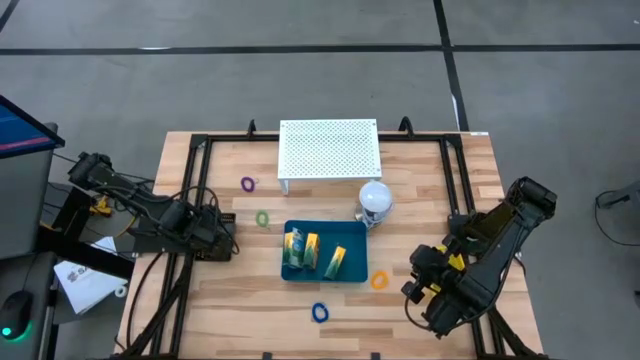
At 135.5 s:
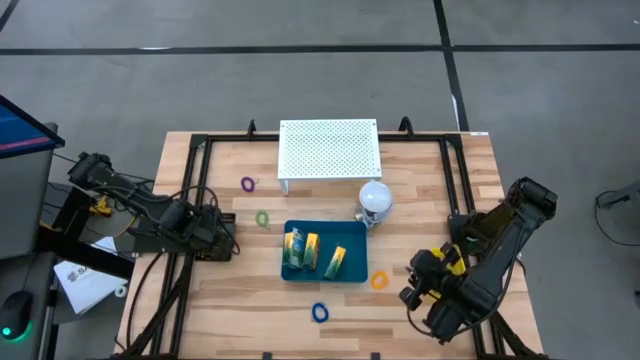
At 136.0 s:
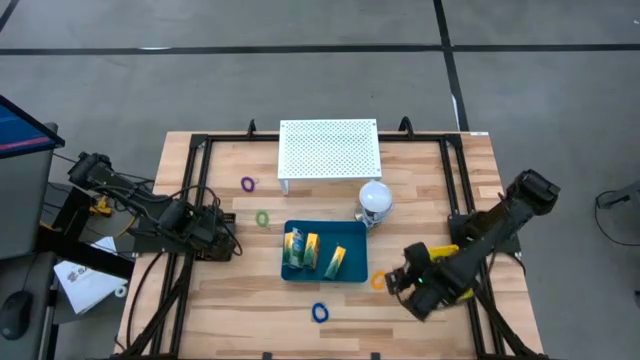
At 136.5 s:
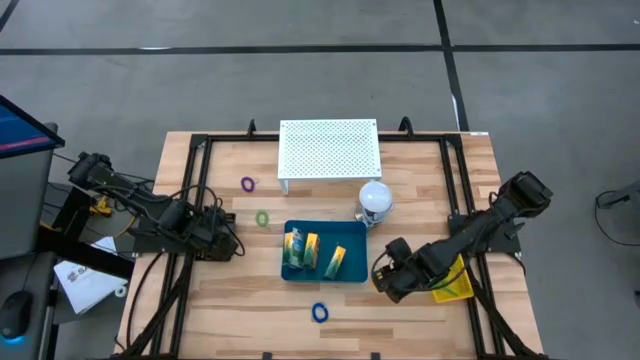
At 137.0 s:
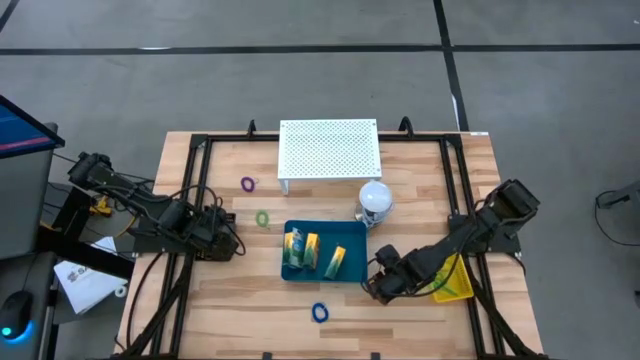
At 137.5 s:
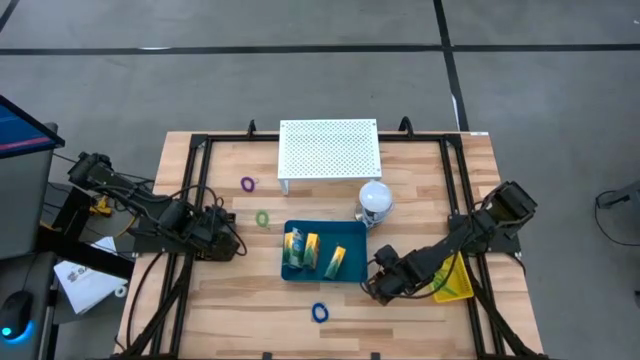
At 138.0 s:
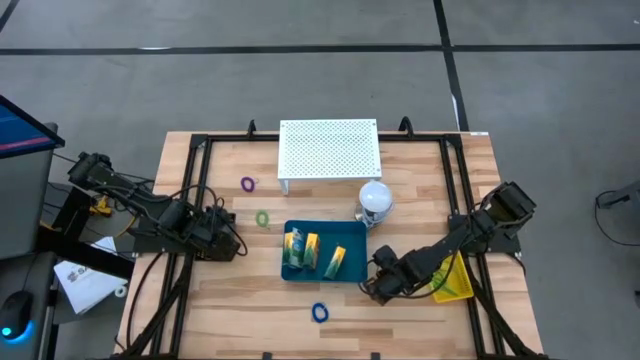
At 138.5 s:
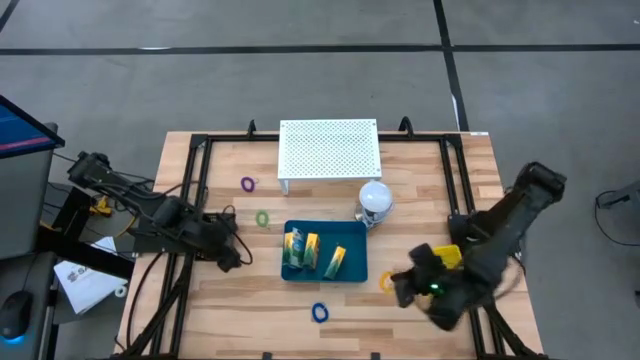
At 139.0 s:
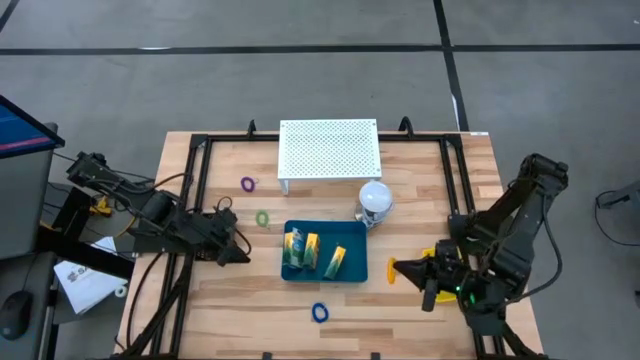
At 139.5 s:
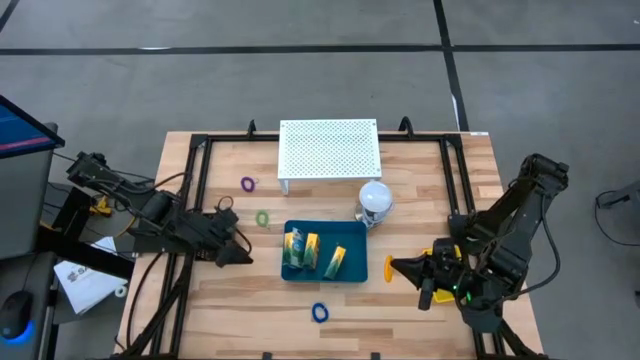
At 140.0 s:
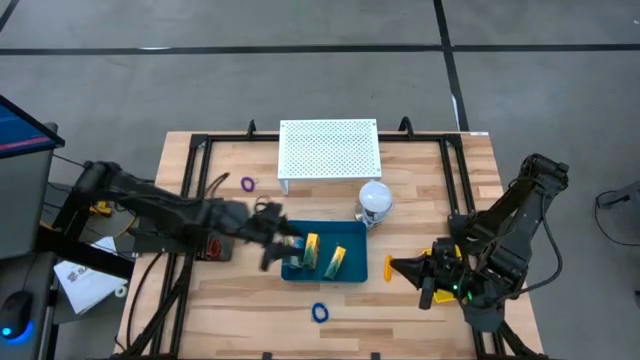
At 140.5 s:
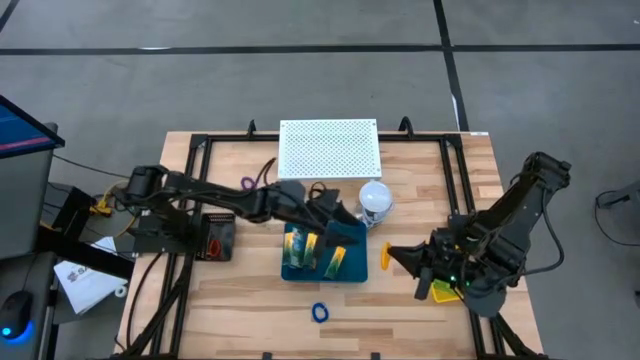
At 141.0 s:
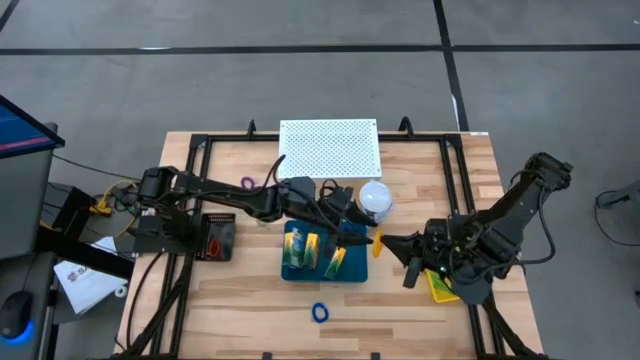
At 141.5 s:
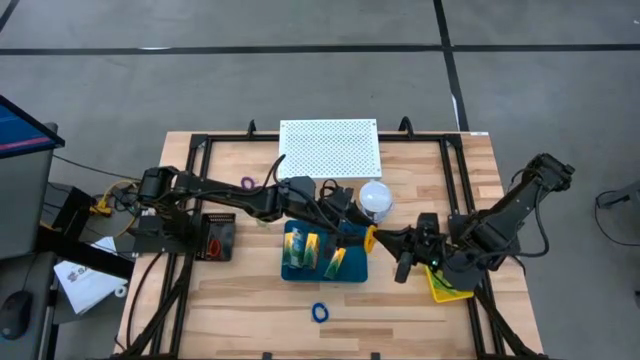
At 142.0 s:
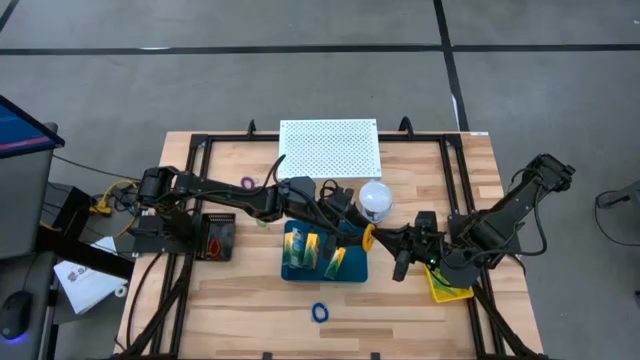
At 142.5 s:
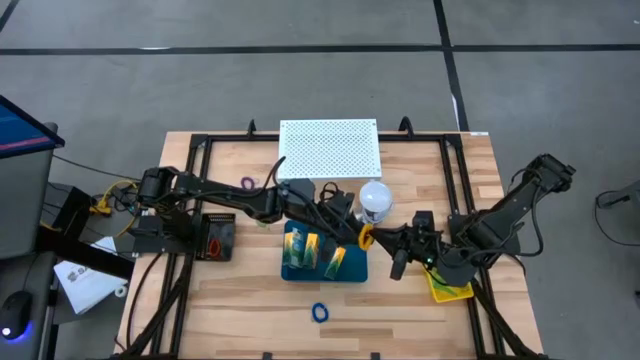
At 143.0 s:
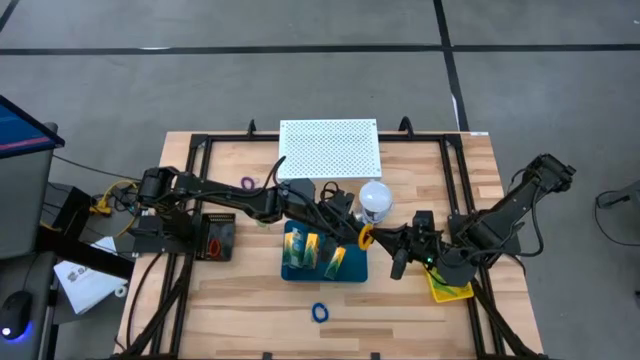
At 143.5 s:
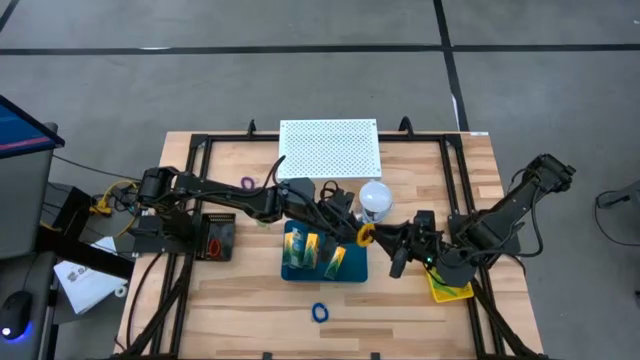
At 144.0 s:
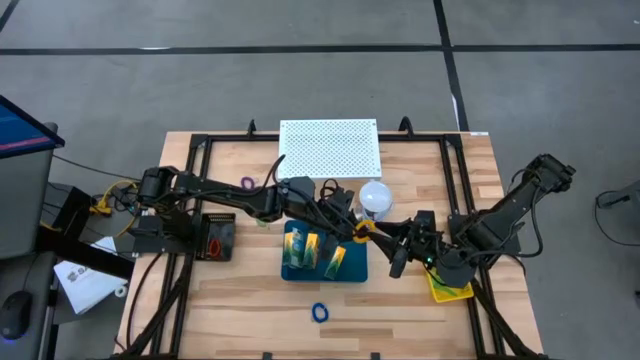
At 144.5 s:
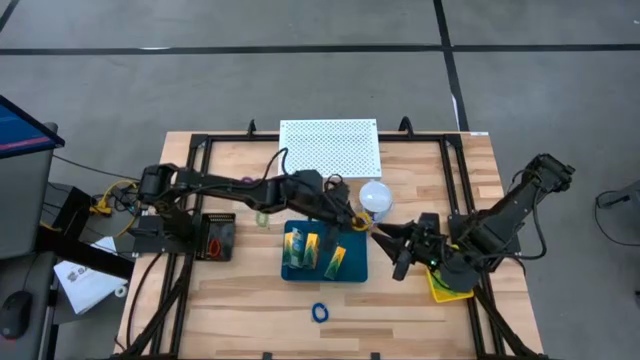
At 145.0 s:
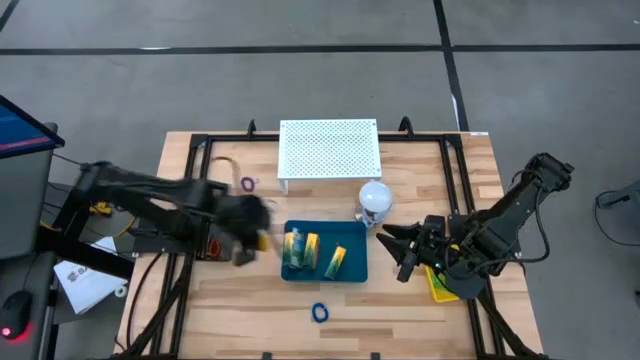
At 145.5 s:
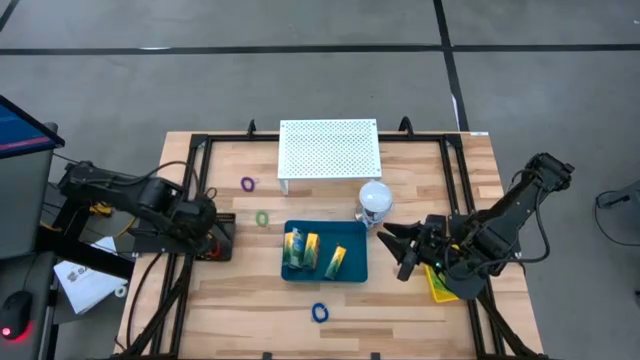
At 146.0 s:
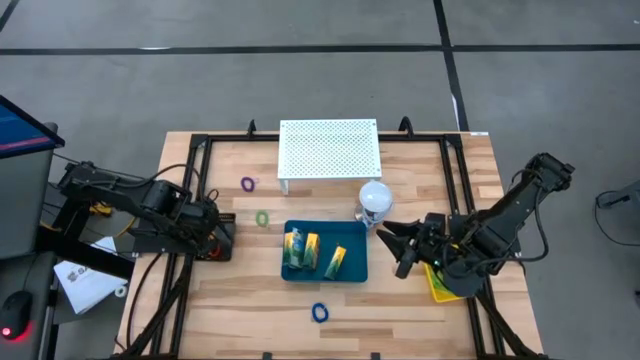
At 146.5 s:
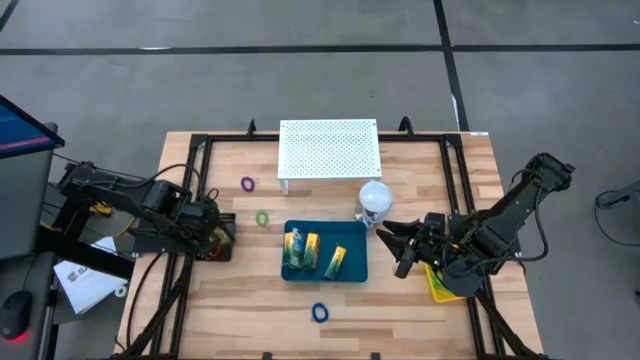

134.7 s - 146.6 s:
Task: Pick & Place Office Desk Supplies
Put the yellow spring keychain into the black bin

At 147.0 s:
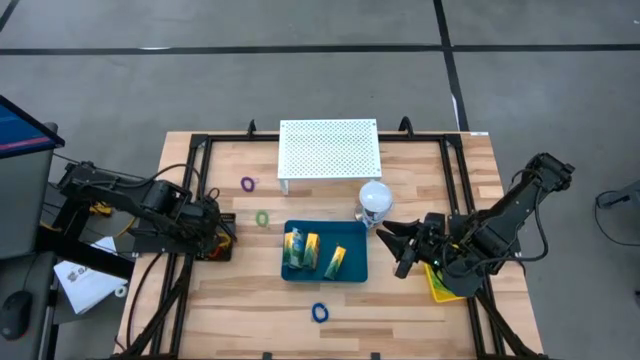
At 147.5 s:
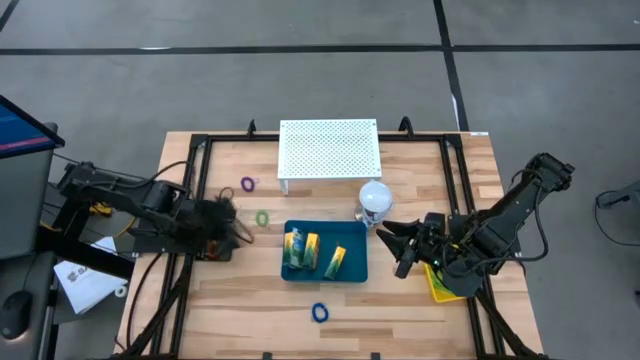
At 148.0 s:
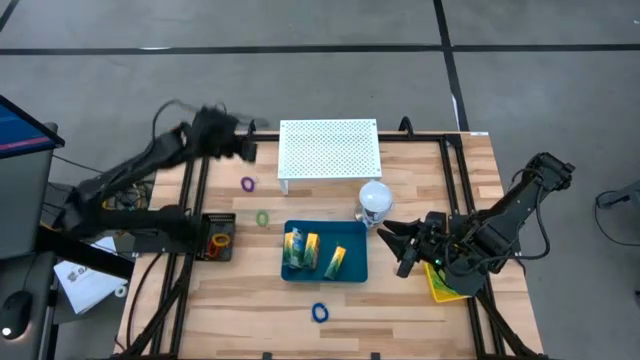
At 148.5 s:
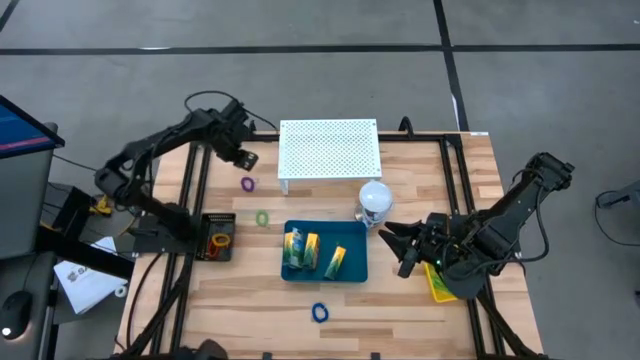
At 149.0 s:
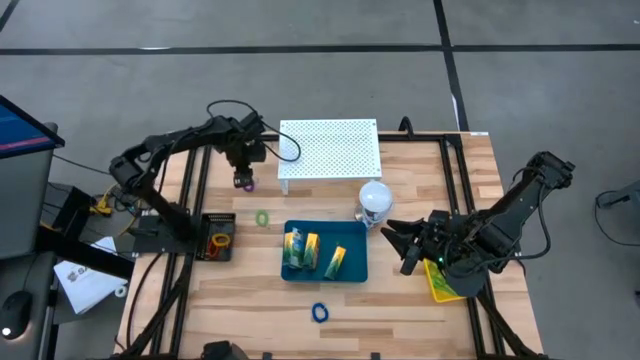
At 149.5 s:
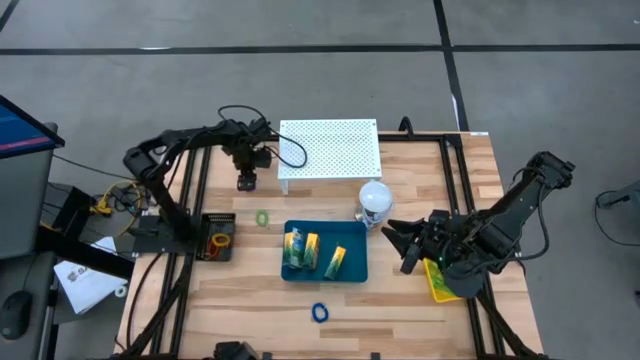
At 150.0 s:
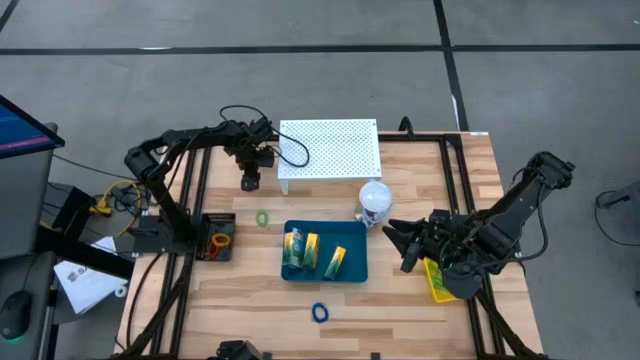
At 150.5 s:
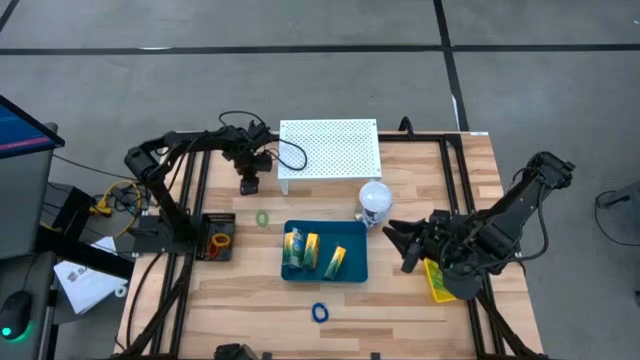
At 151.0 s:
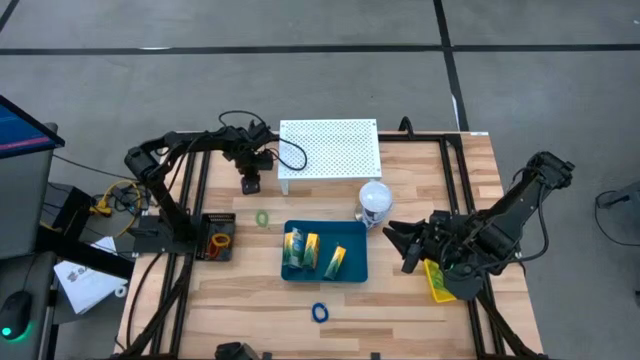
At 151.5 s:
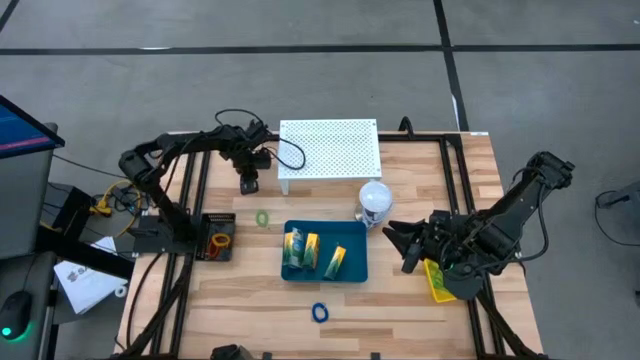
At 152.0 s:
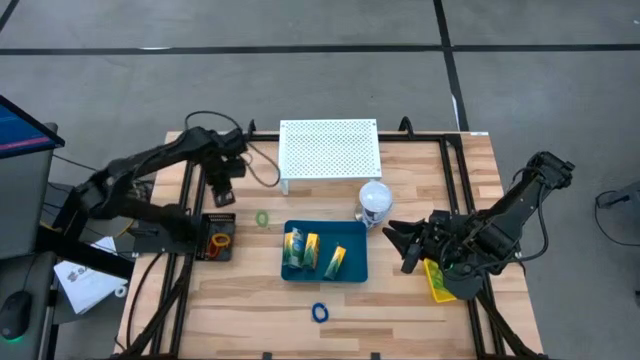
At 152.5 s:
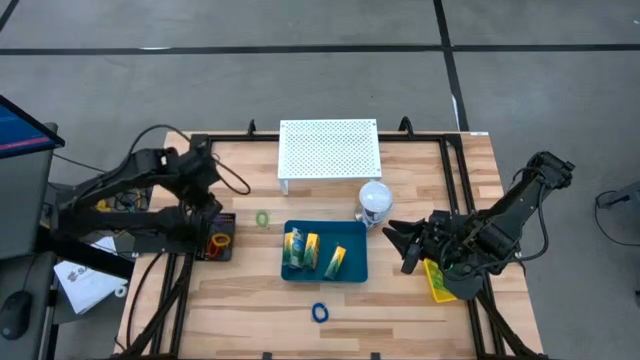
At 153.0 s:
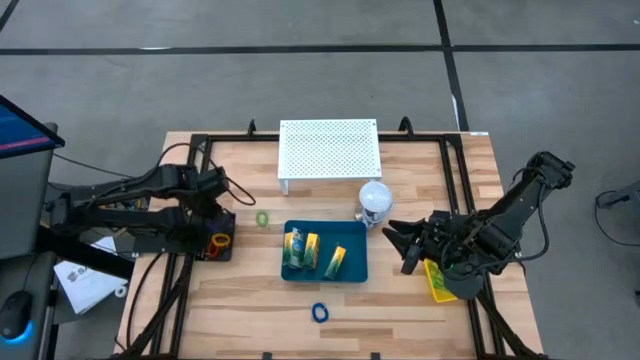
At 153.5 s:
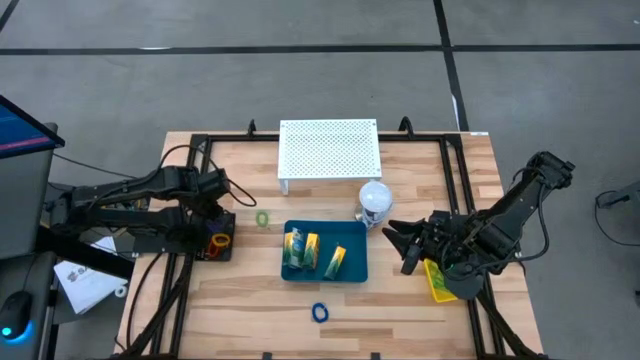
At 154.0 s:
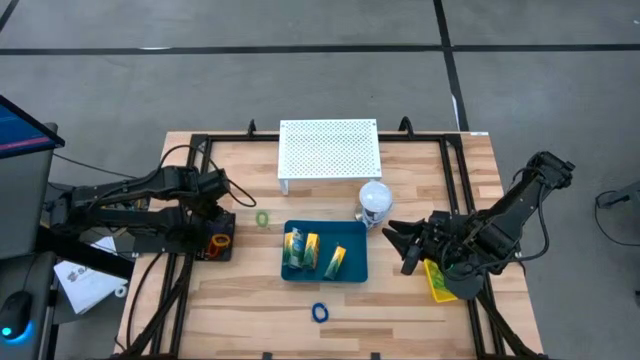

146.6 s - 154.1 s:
Put the purple spring keychain into the black bin

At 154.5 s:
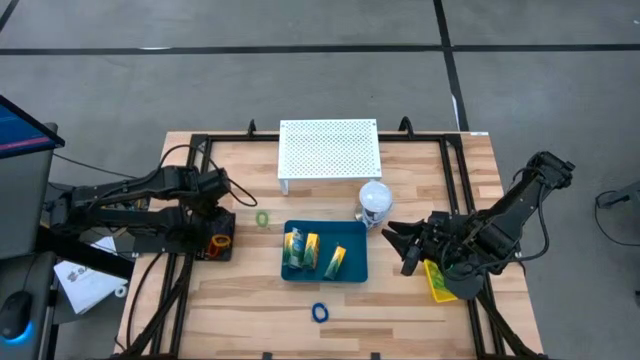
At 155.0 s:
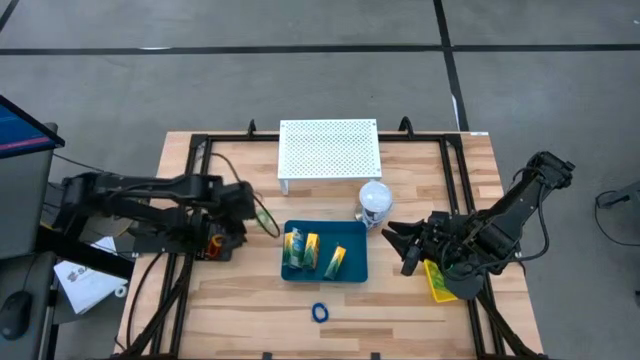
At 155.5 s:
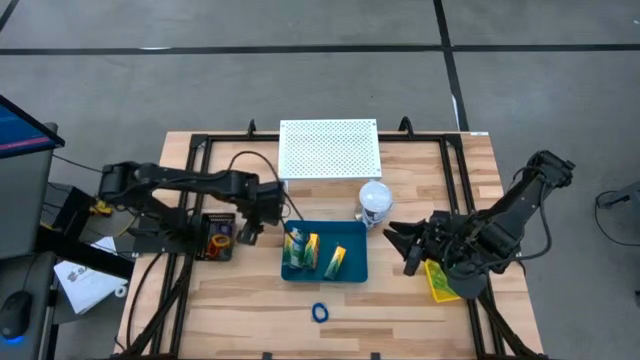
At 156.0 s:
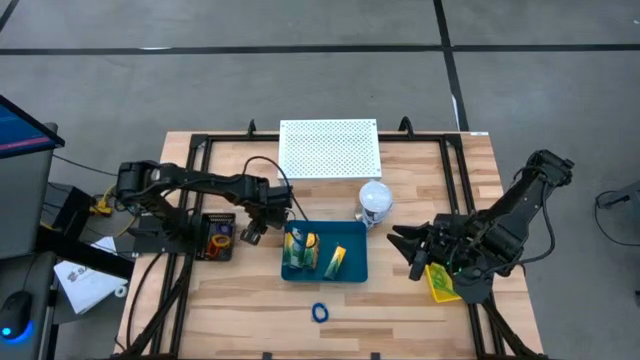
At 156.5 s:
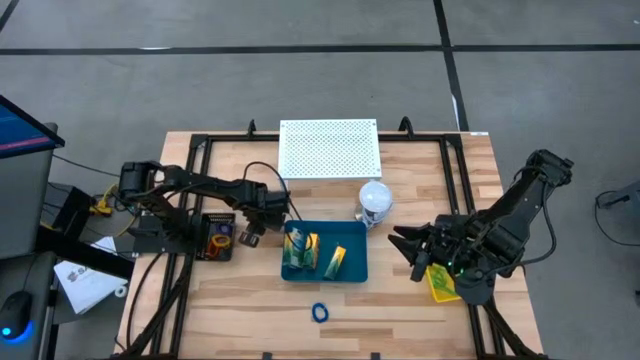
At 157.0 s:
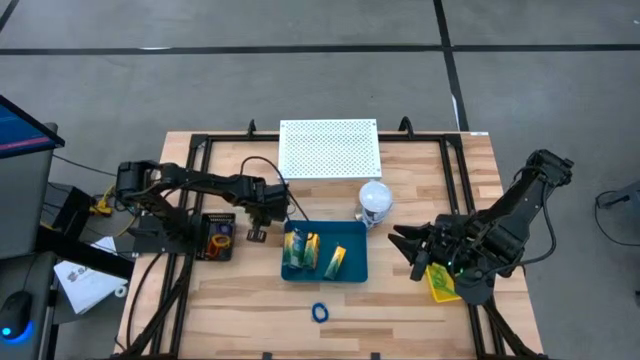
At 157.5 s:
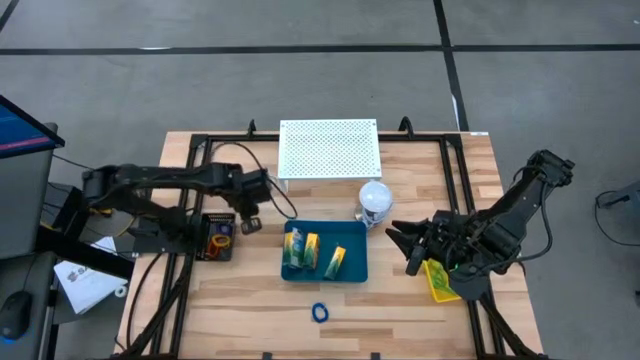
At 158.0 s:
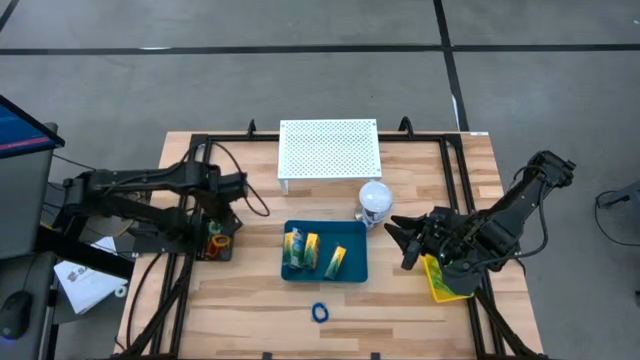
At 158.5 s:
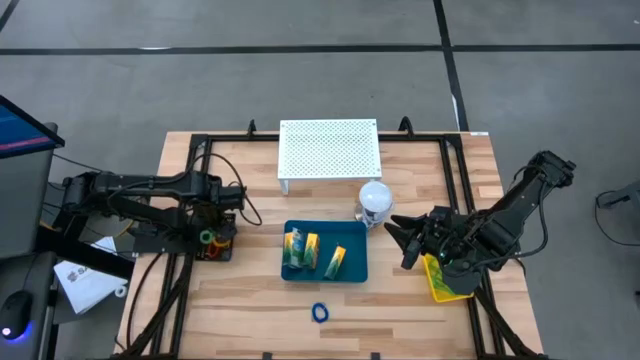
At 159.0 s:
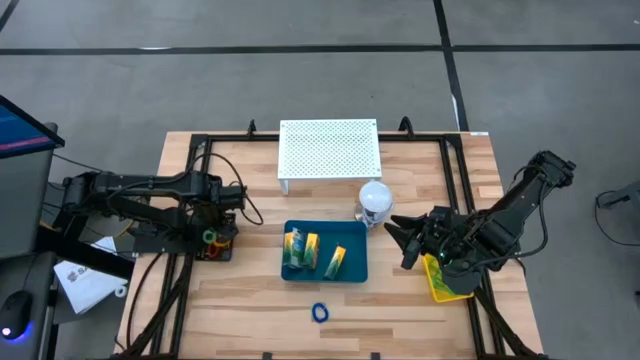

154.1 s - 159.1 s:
Put the green spring keychain into the black bin
